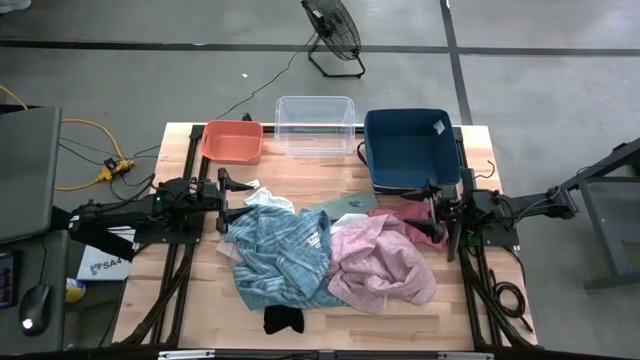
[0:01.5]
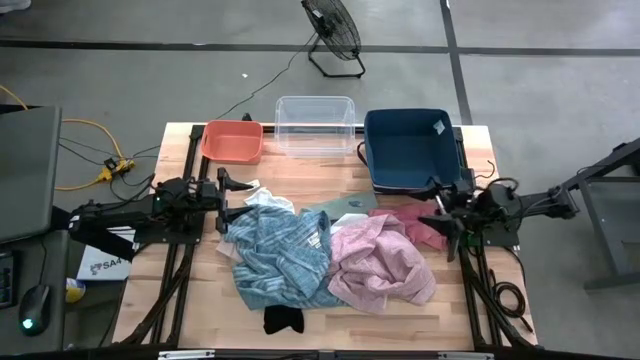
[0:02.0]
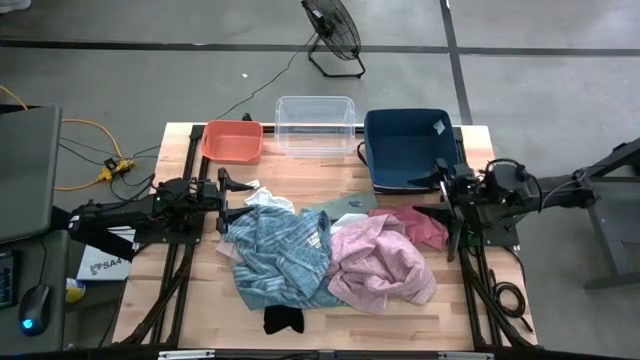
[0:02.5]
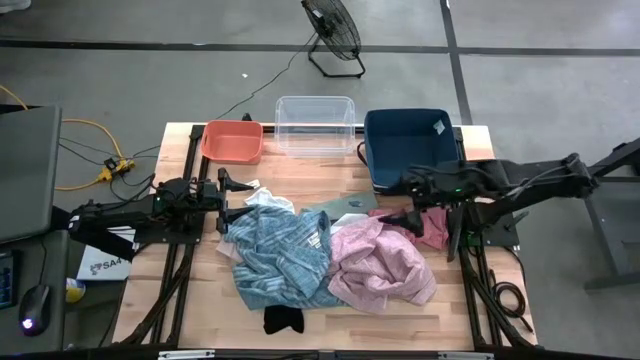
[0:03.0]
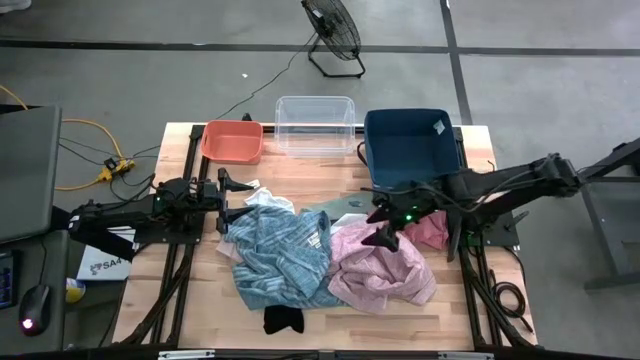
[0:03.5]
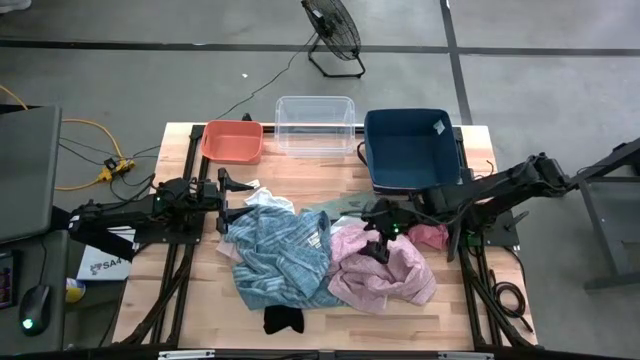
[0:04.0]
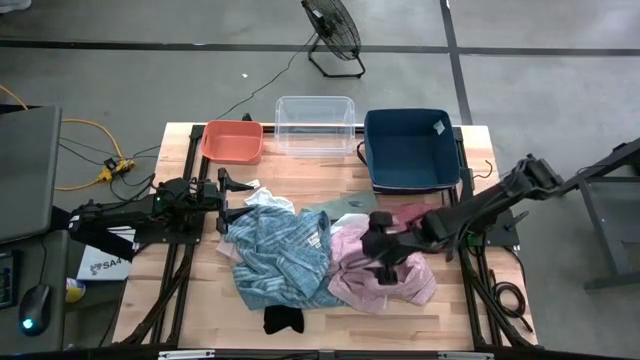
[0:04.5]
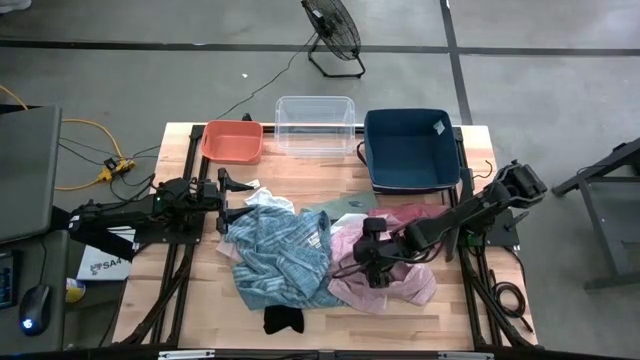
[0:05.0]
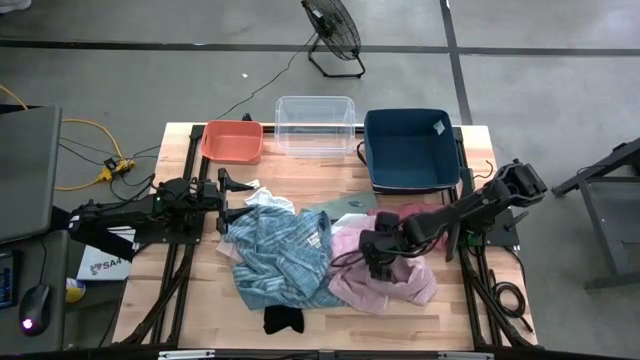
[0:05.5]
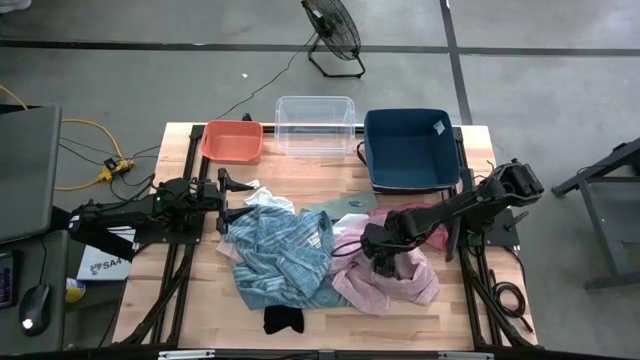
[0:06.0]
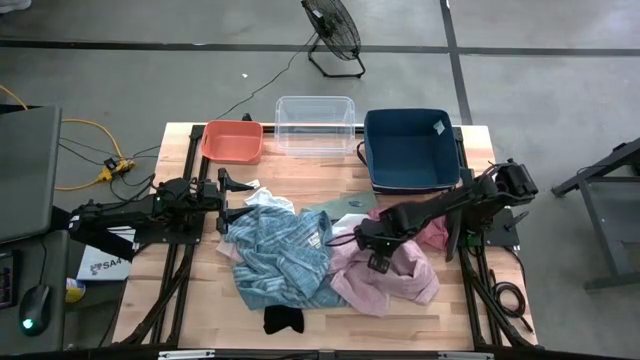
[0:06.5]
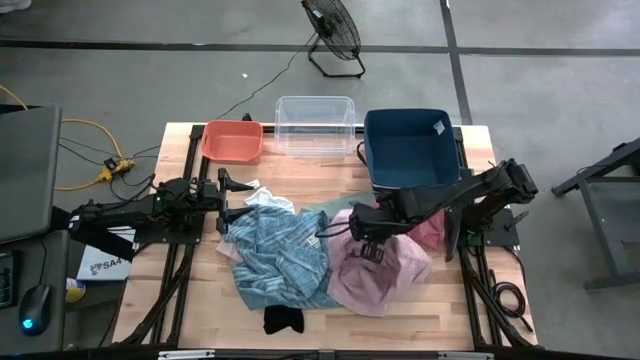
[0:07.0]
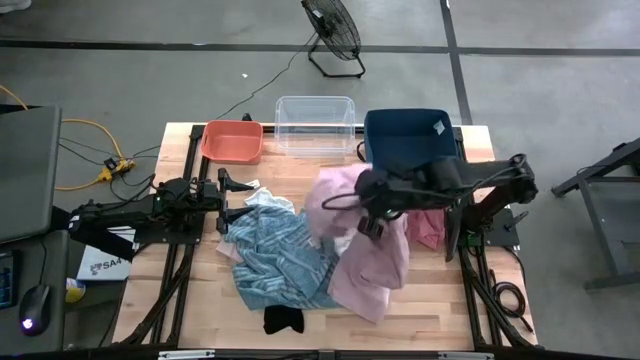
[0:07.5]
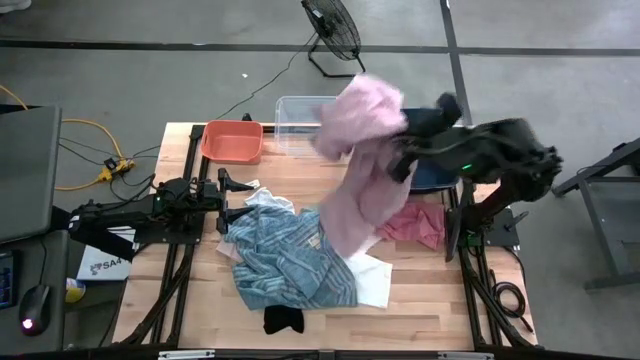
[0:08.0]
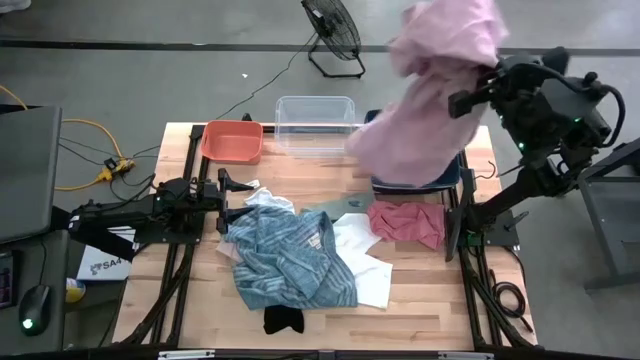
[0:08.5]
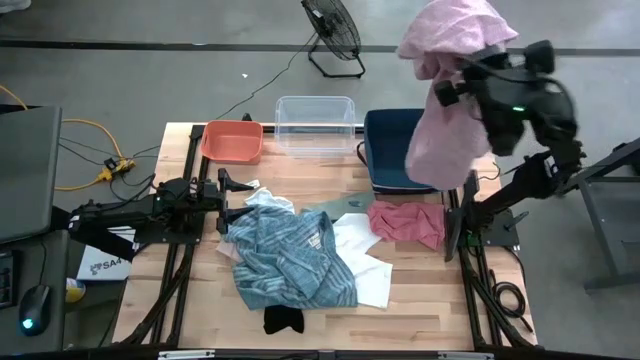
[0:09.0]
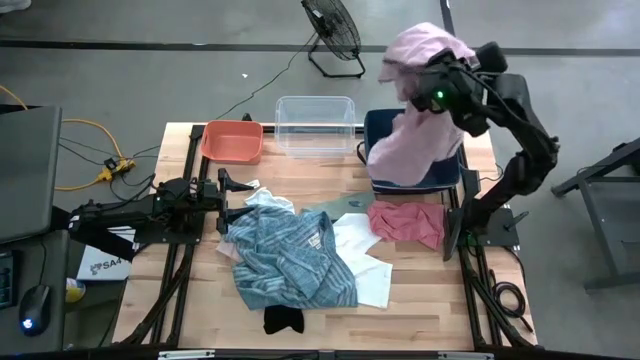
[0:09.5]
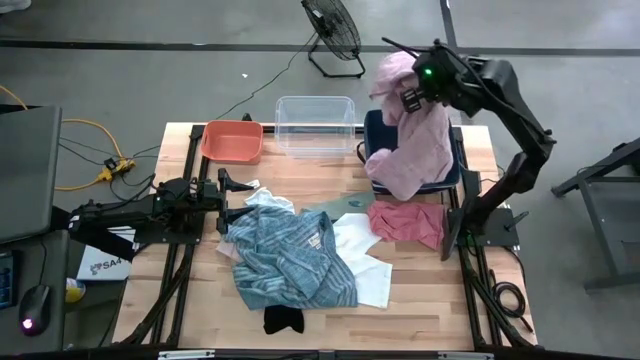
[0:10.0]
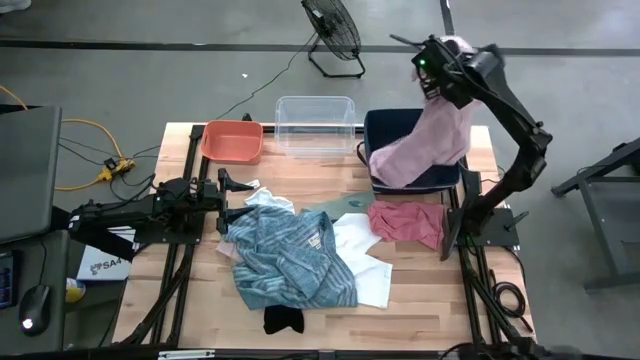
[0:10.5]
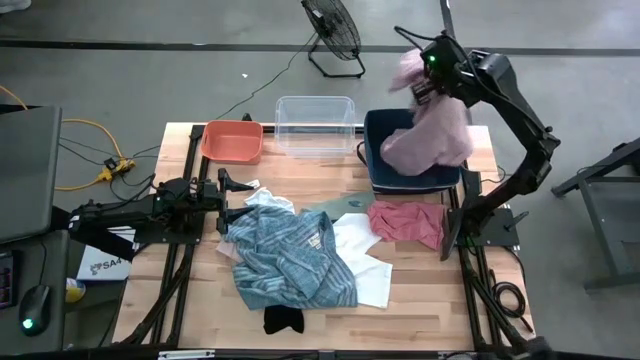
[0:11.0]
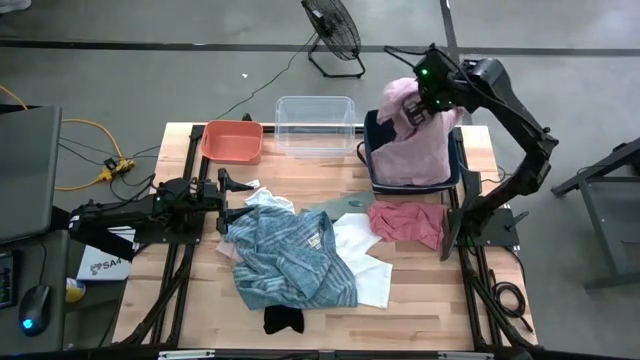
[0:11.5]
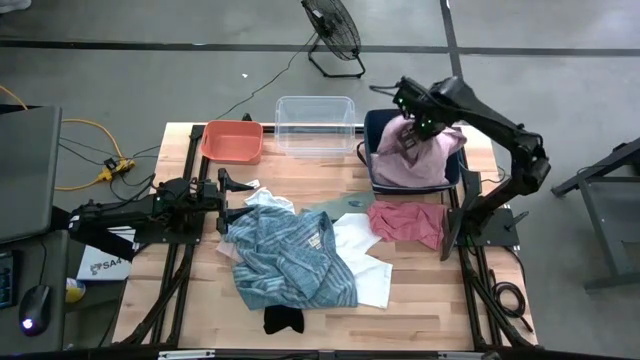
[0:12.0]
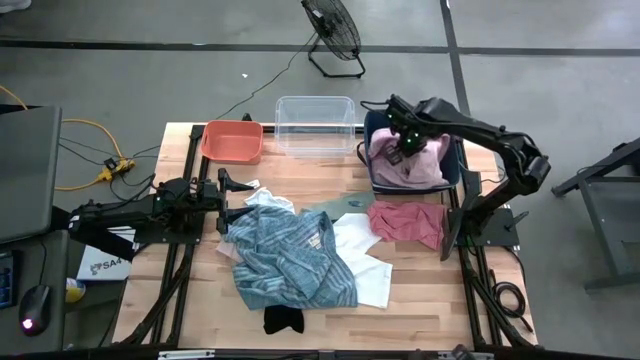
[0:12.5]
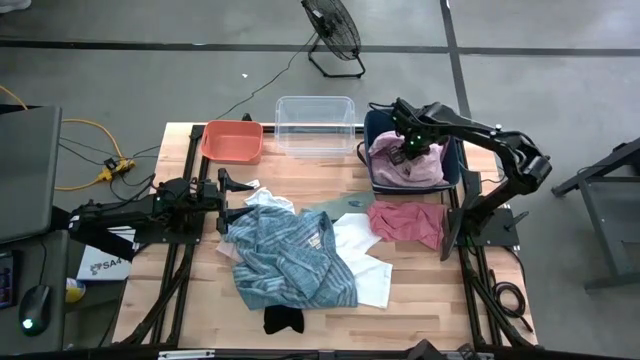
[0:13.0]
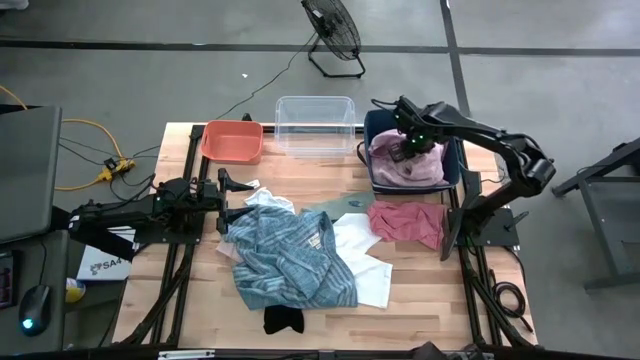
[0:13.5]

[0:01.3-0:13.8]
Task: Pick & Place Cloths
Put the pink polo shirt into the blue bin

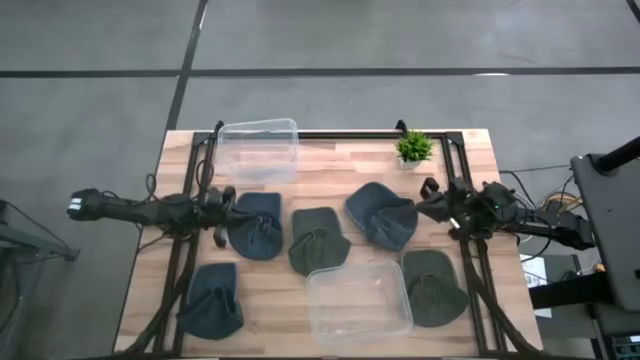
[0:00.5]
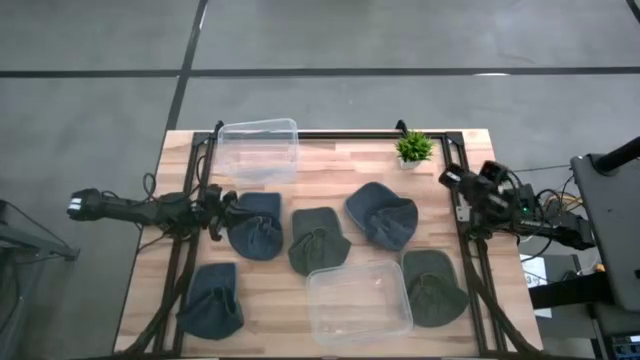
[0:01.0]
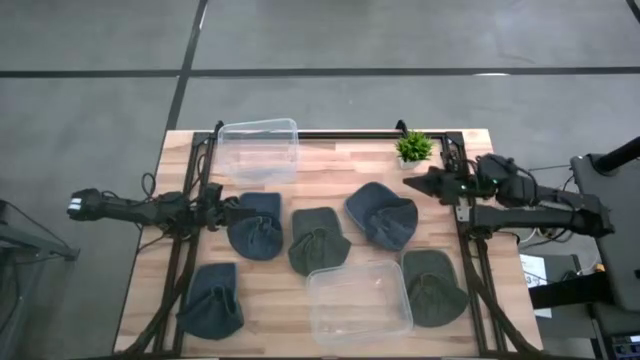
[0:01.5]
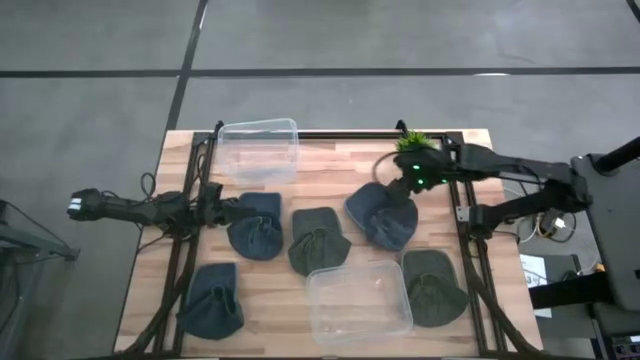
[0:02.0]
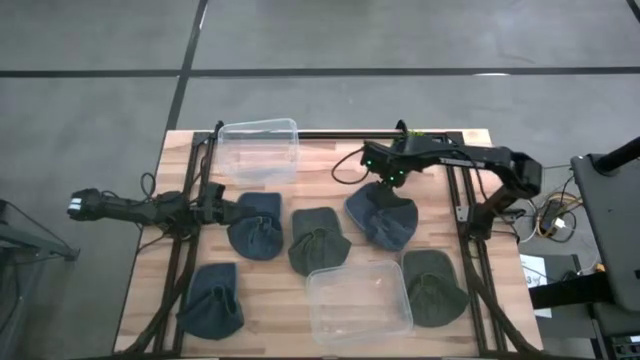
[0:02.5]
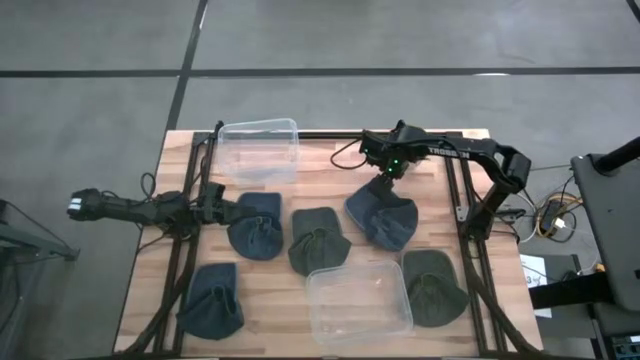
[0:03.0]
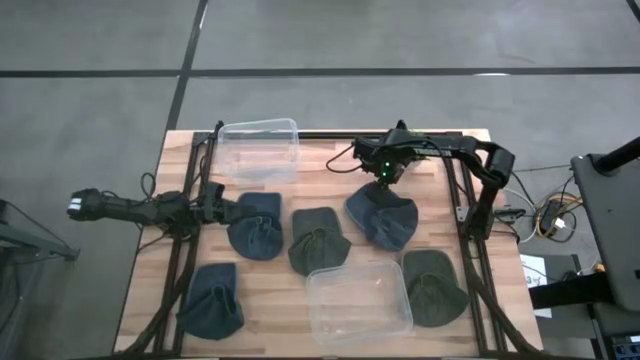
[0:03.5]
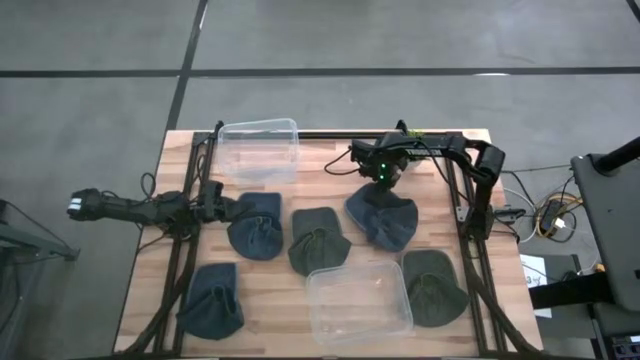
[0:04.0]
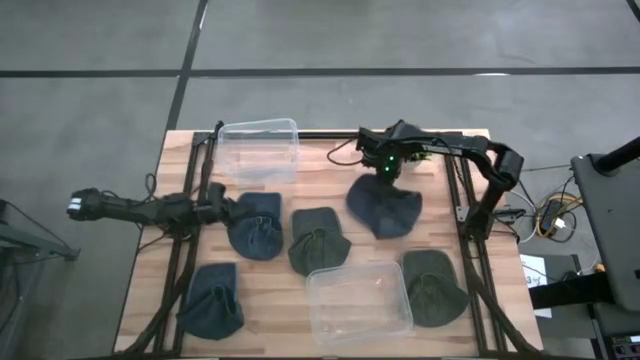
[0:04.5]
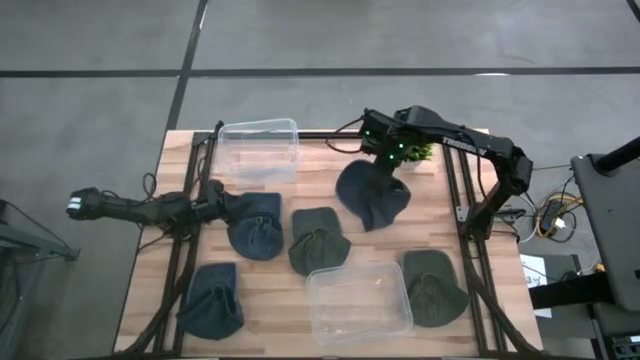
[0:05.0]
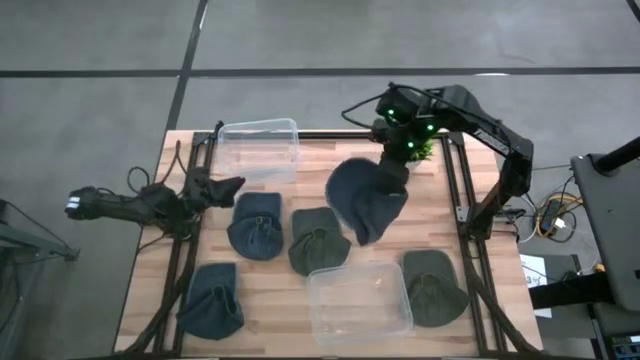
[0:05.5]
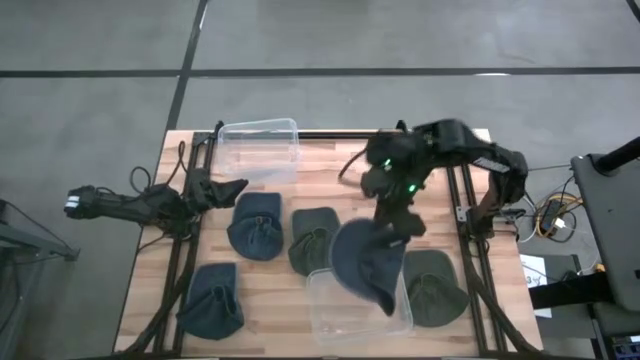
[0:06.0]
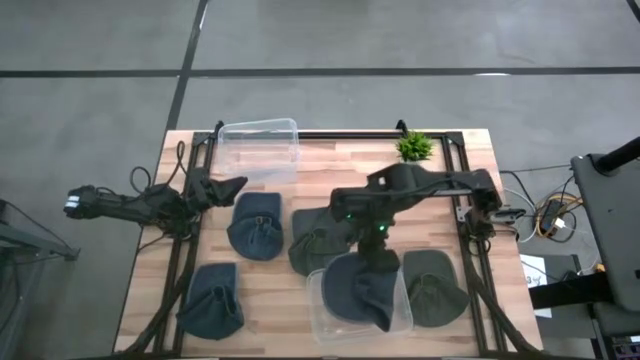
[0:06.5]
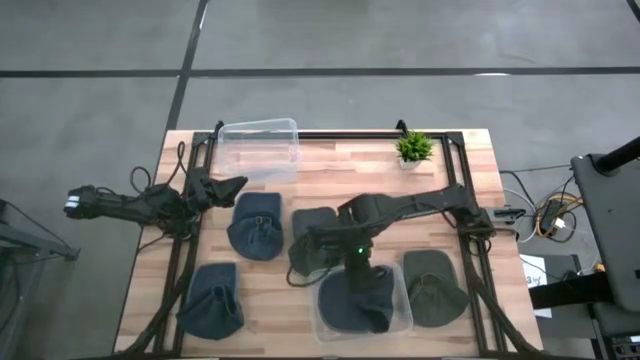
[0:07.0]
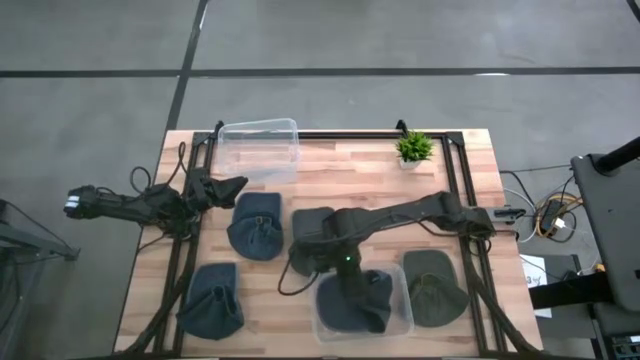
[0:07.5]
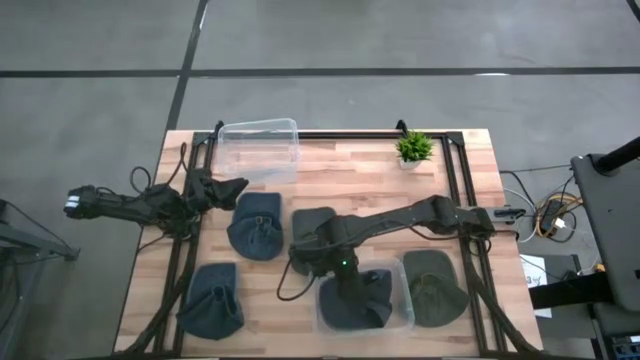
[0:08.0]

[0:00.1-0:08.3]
Task: Pick & Place hat
Put the right blue cap into the bottom transparent bin
